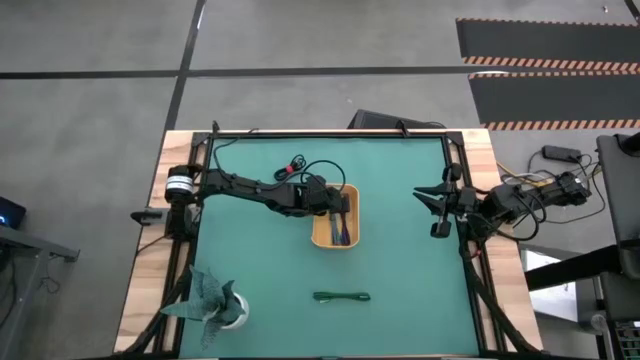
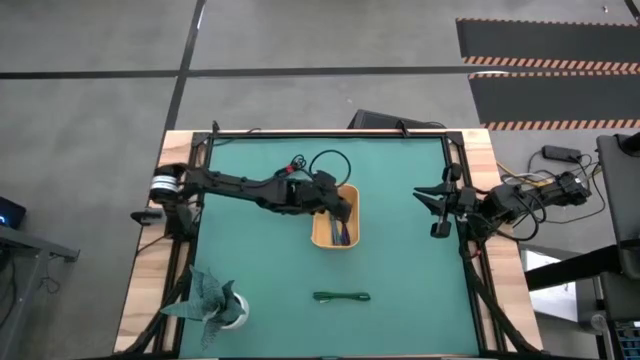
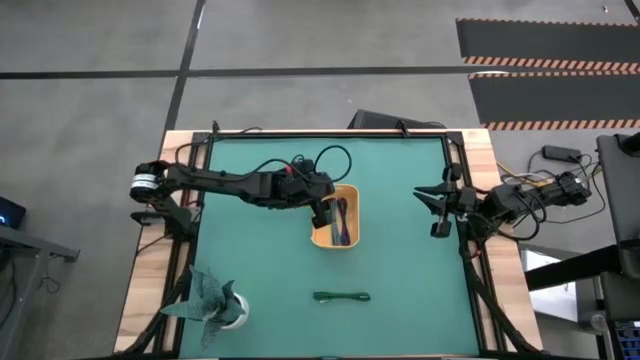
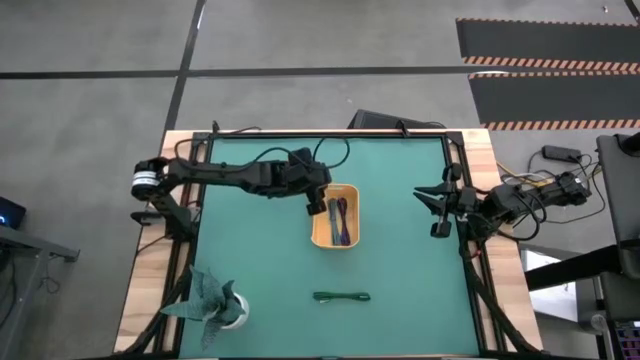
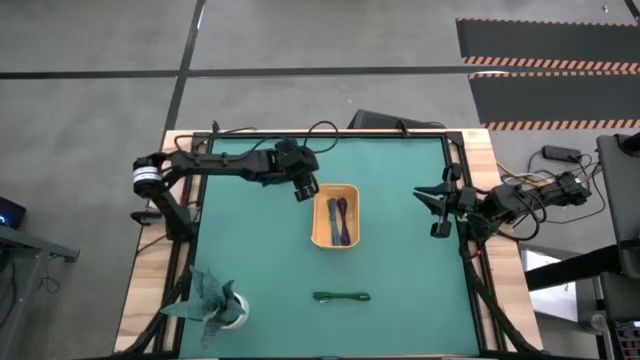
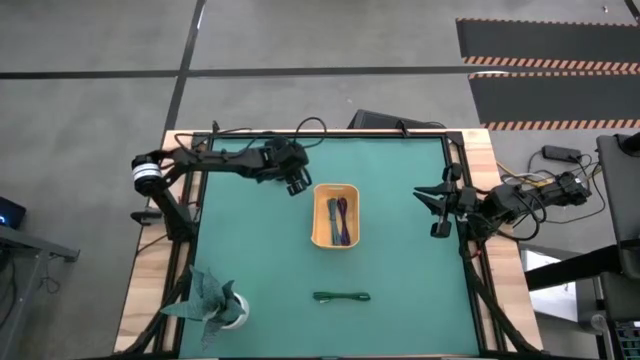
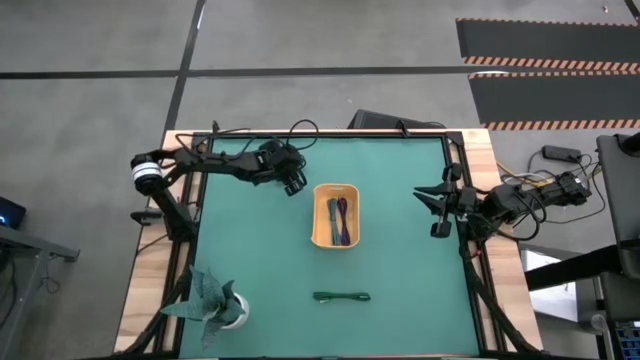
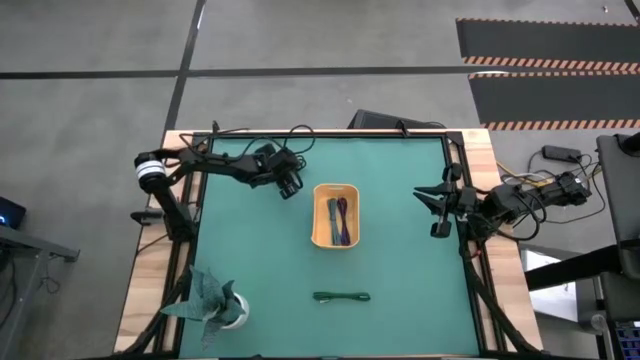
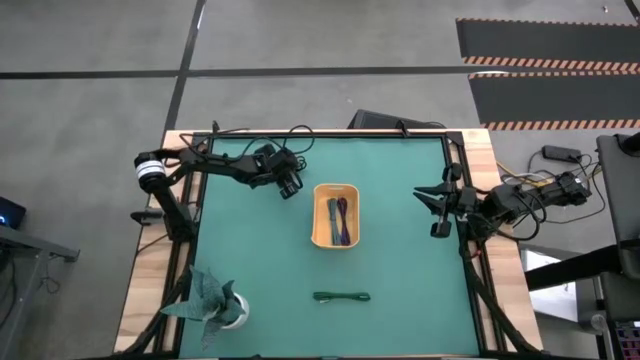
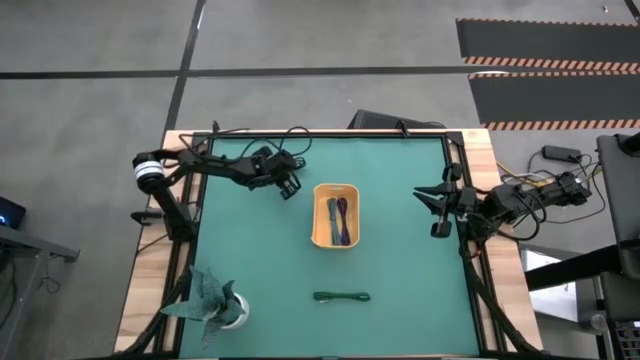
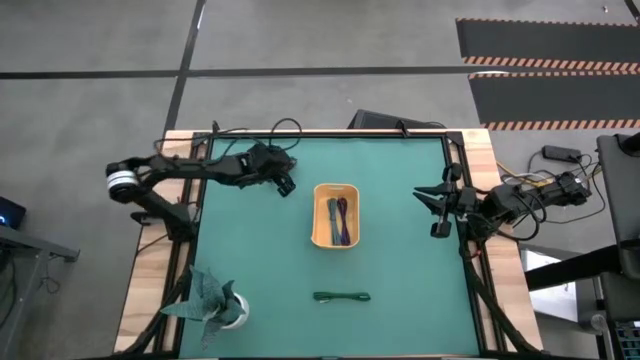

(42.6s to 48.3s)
Task: Pick and place USB-C Cables
Put the black charger cable into the yellow bin

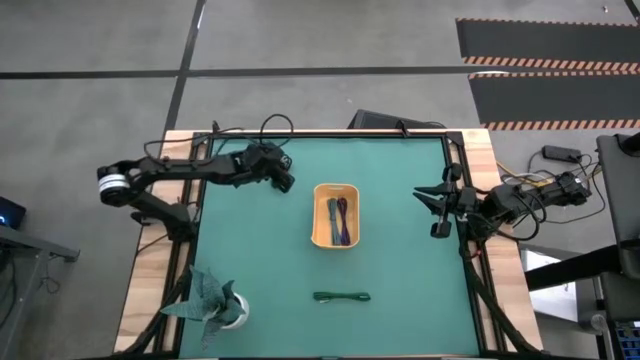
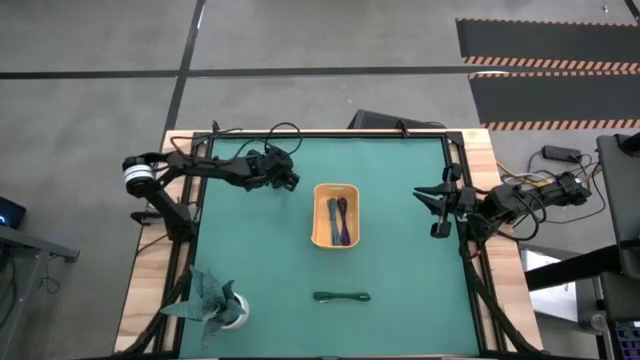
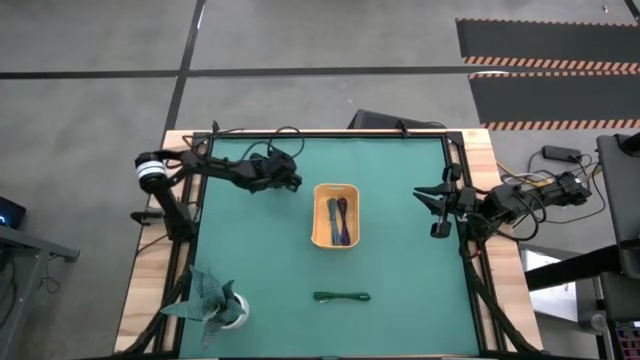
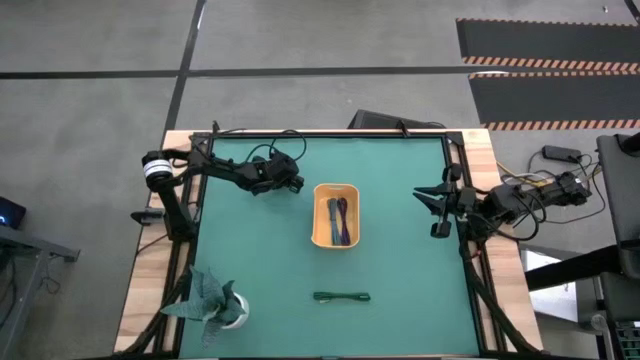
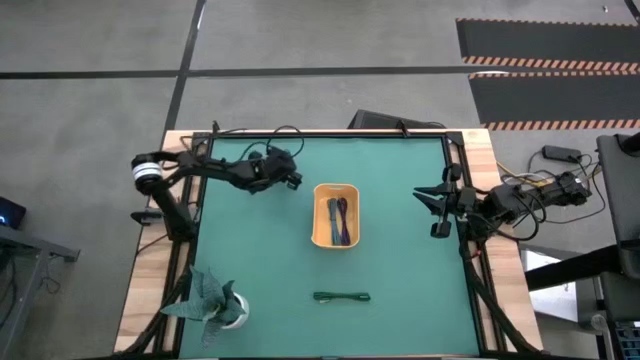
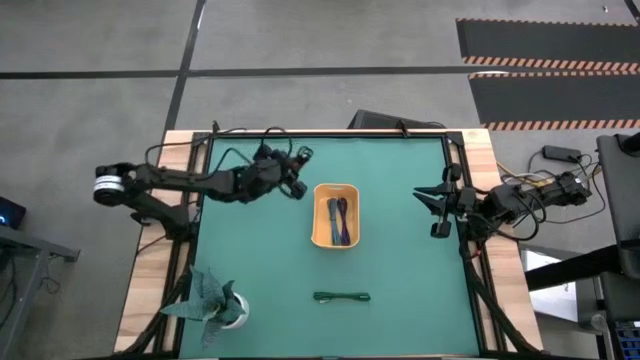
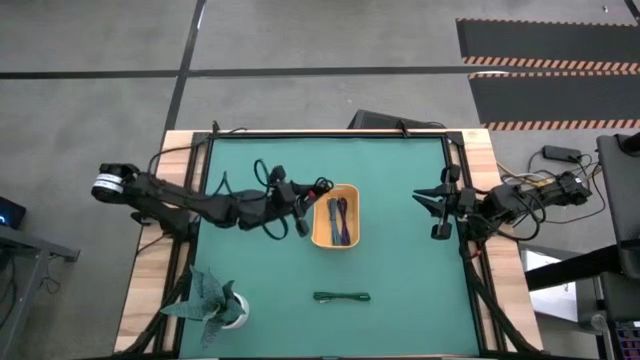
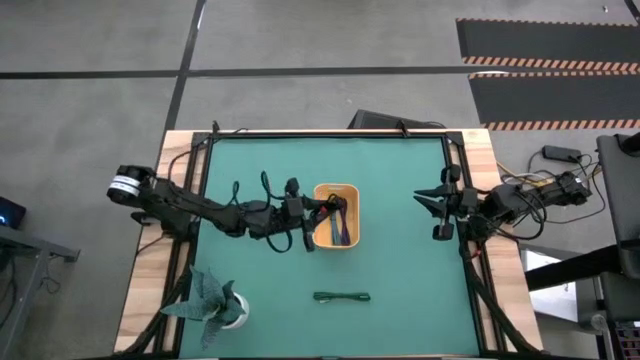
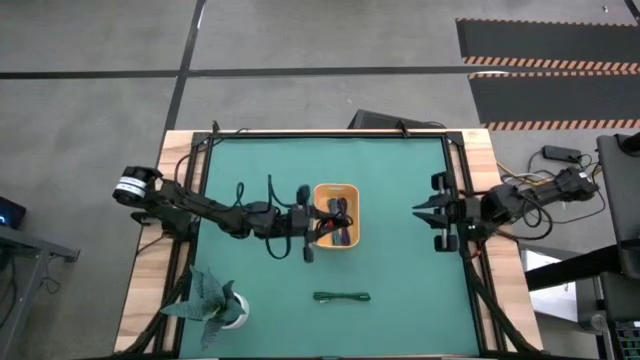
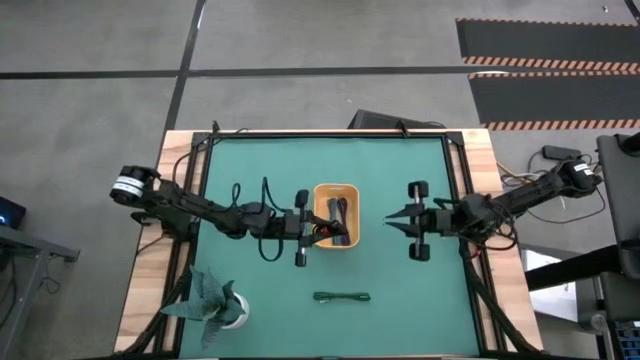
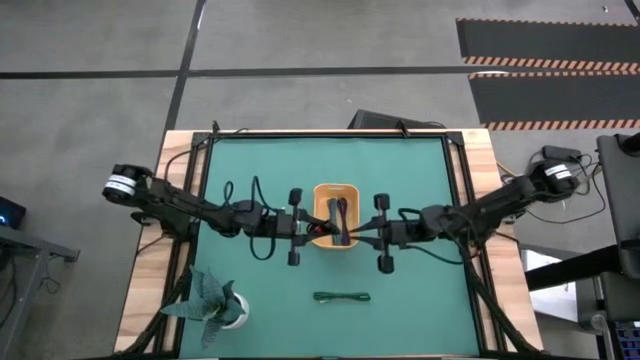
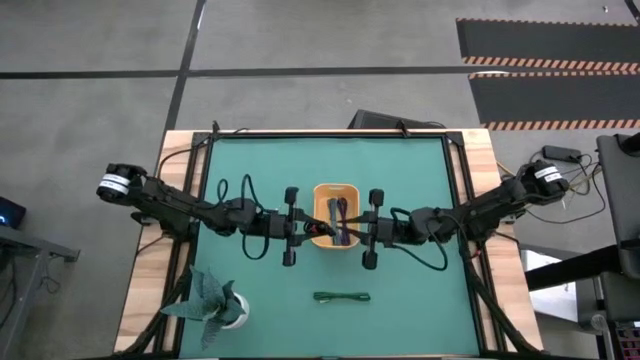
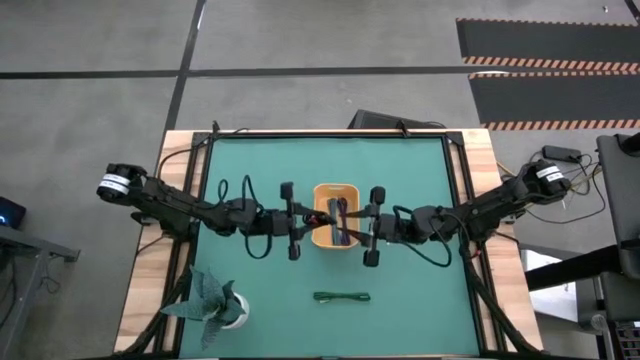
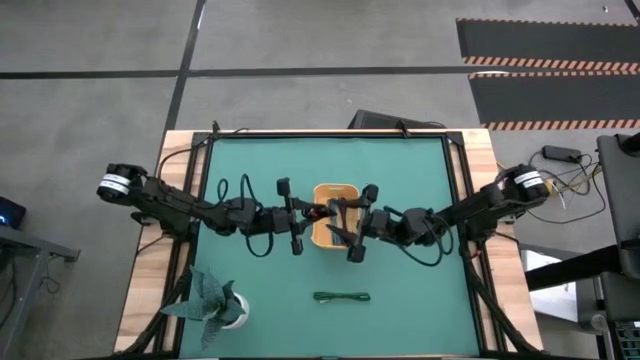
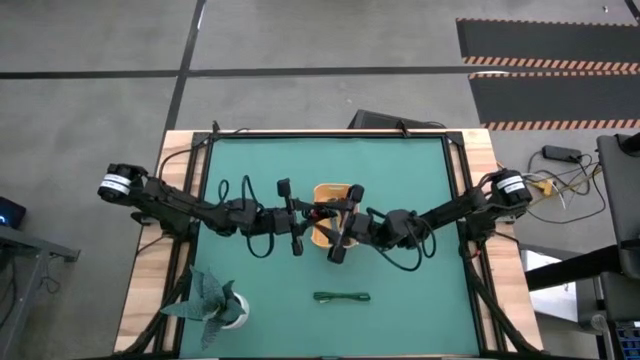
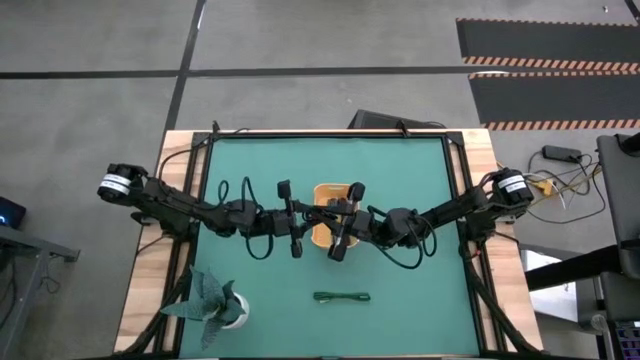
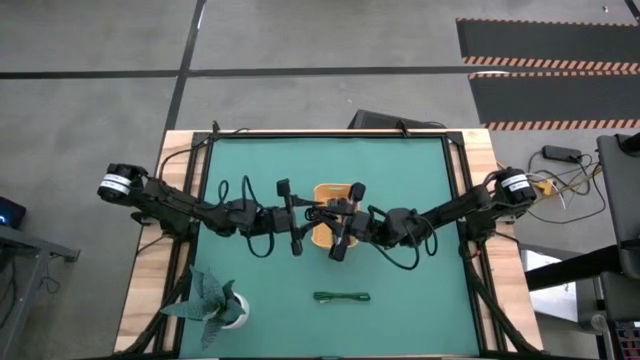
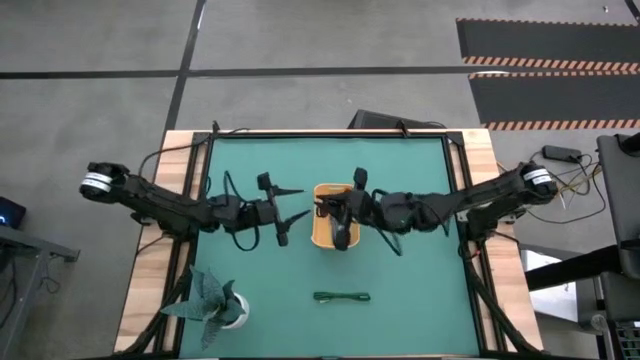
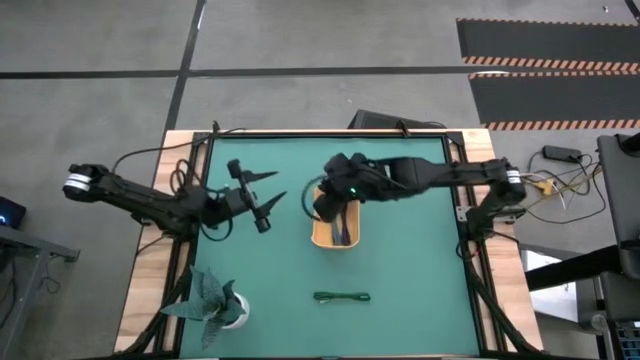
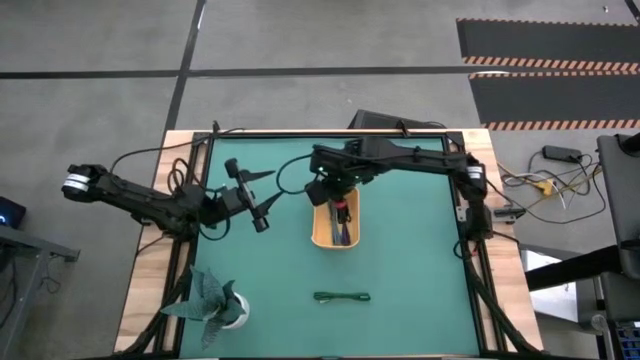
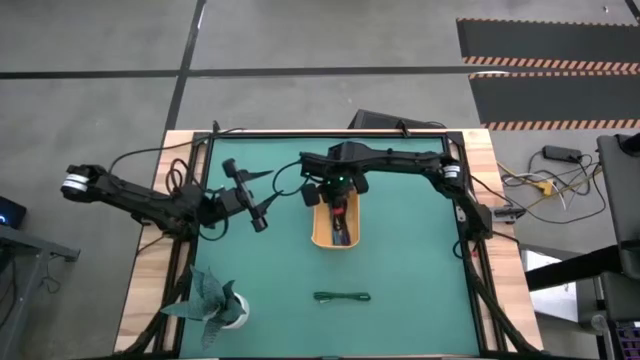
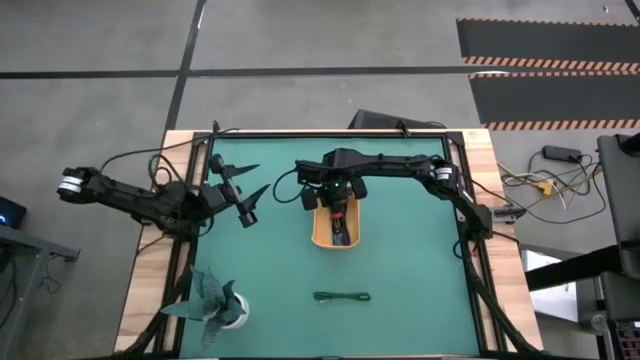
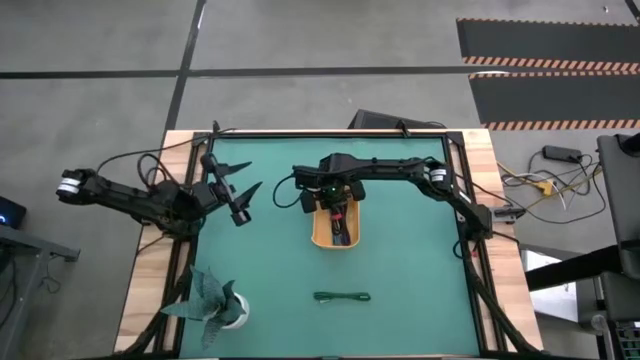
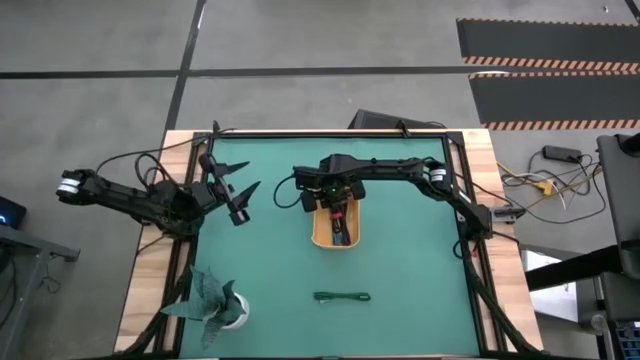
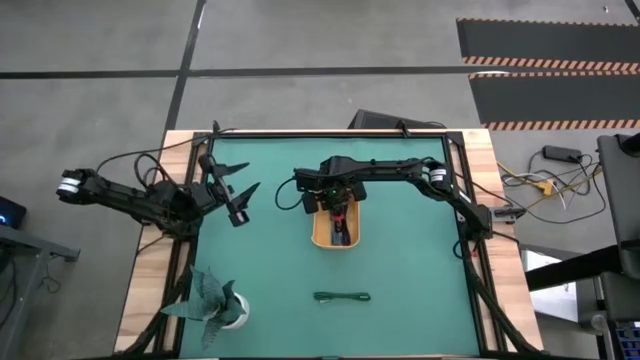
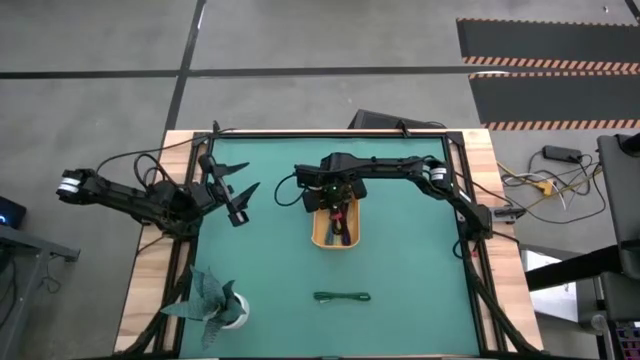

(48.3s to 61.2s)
Put the black charger cable into the yellow bin

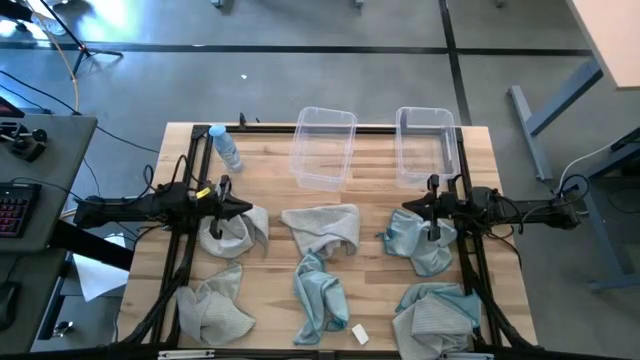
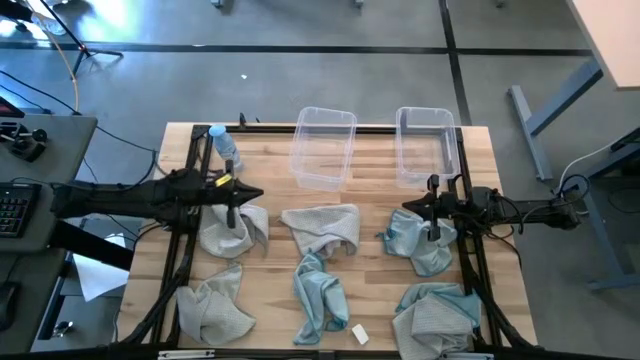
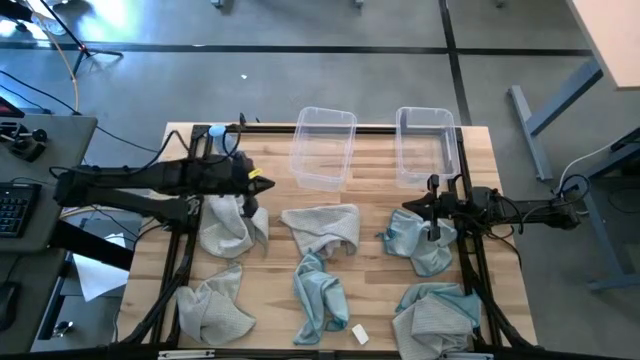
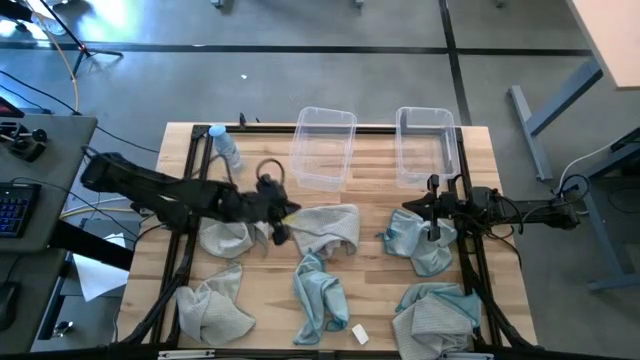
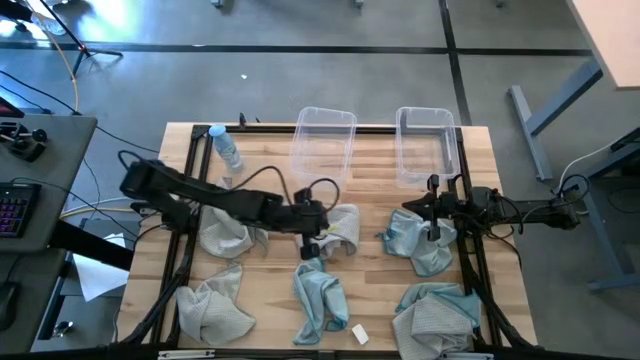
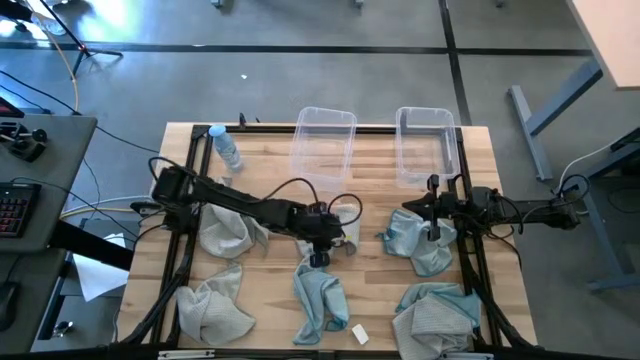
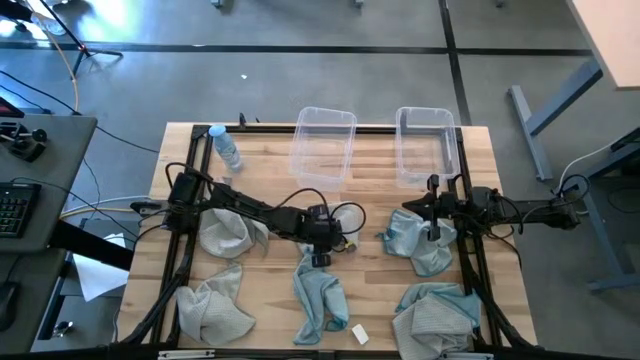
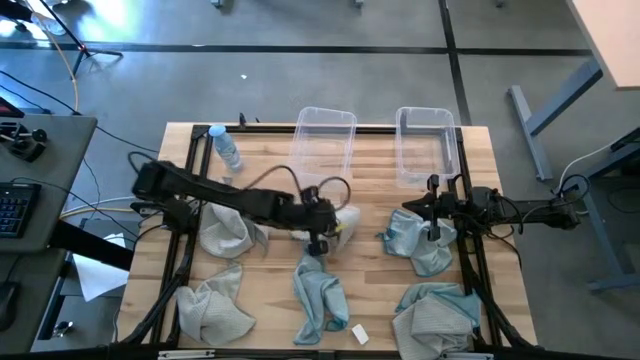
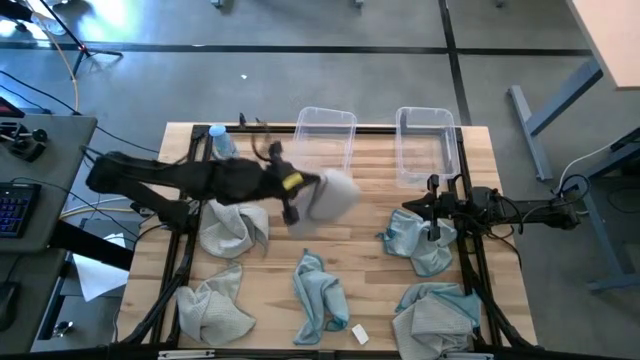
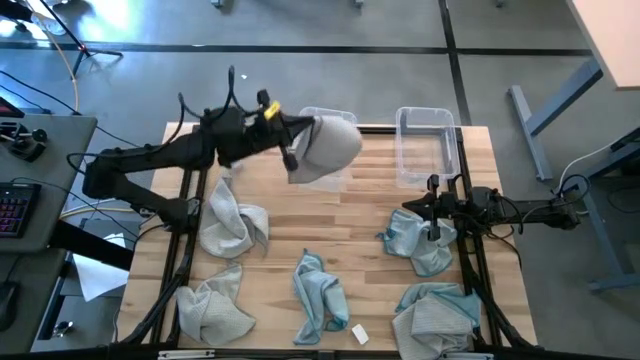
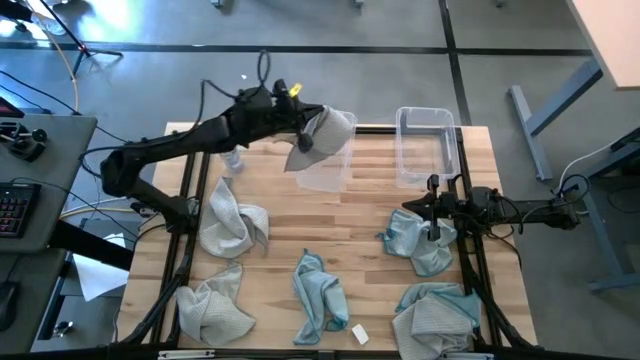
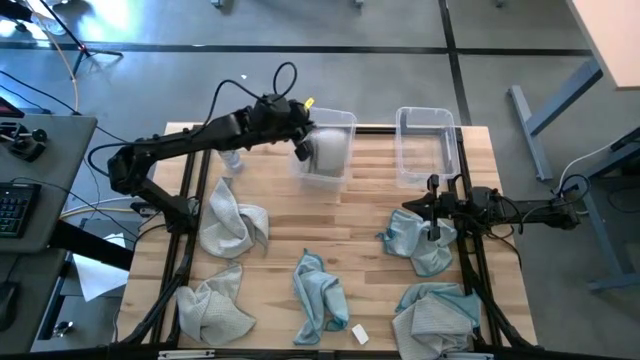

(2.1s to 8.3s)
Task: Sort microfiber towel by color & place in baskets
Put the white microfiber cloth into the left transparent bin
